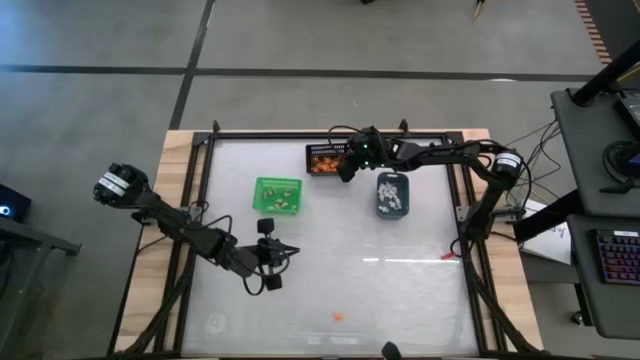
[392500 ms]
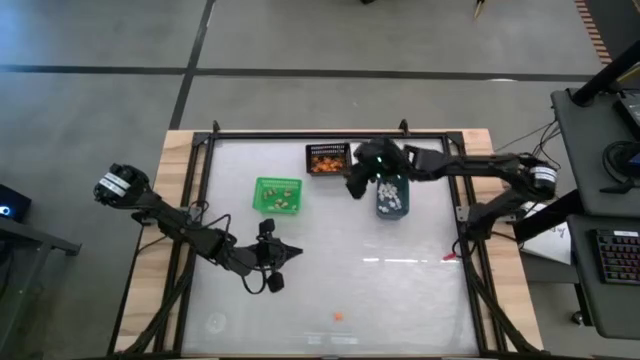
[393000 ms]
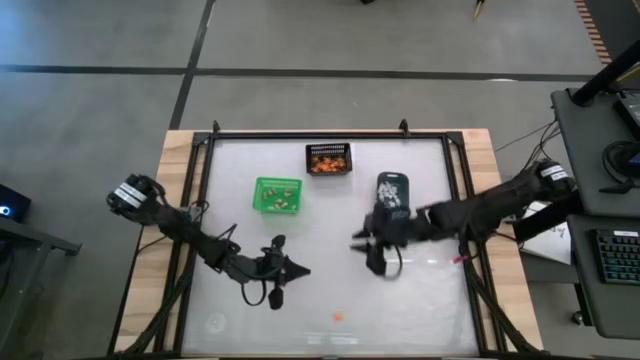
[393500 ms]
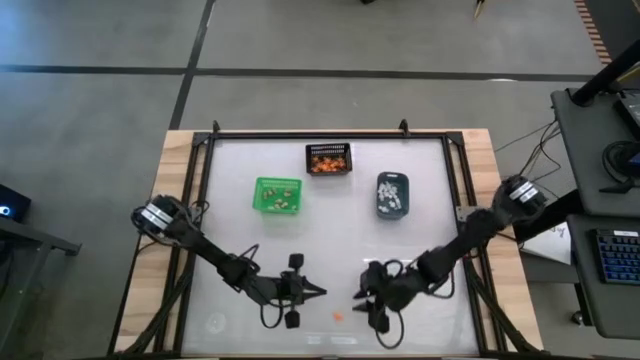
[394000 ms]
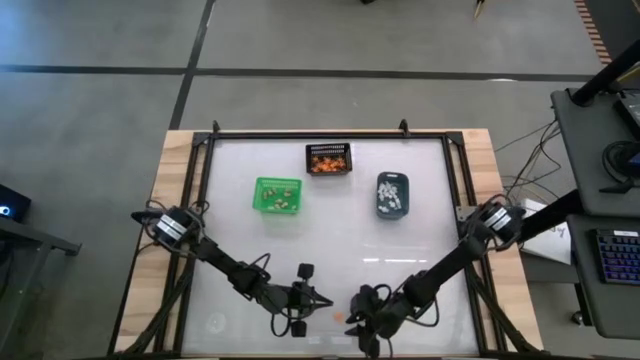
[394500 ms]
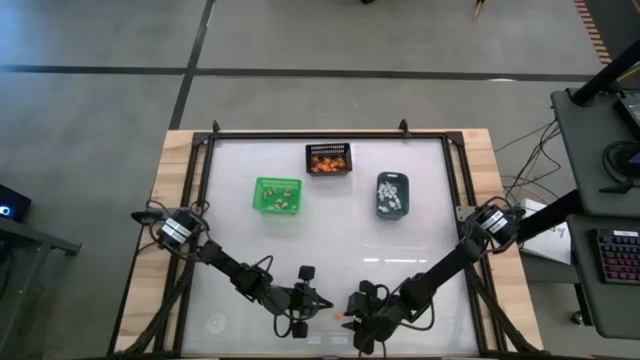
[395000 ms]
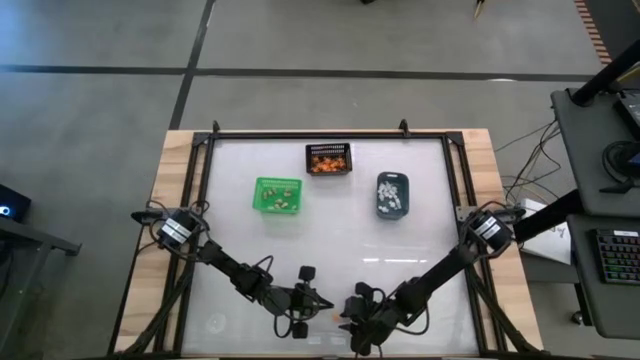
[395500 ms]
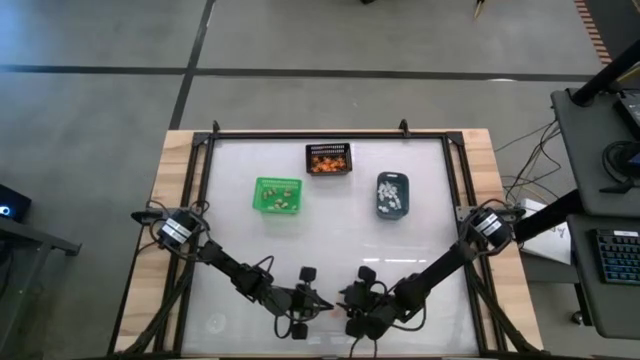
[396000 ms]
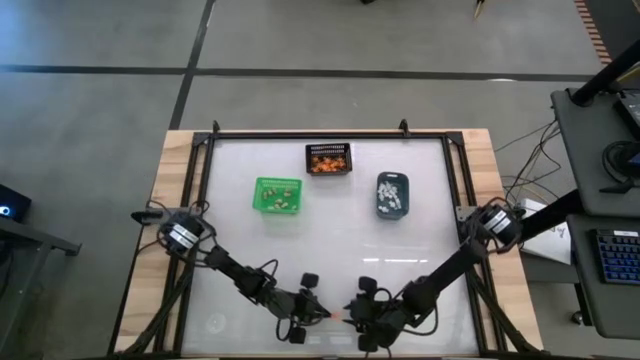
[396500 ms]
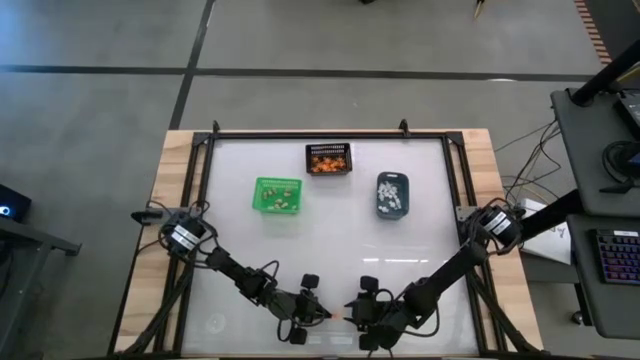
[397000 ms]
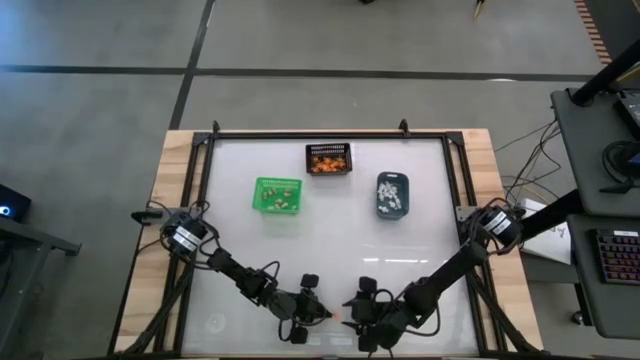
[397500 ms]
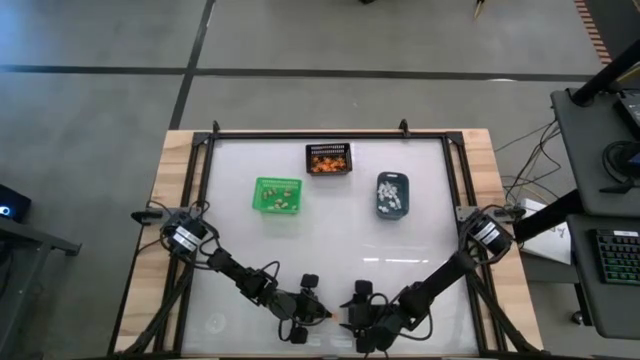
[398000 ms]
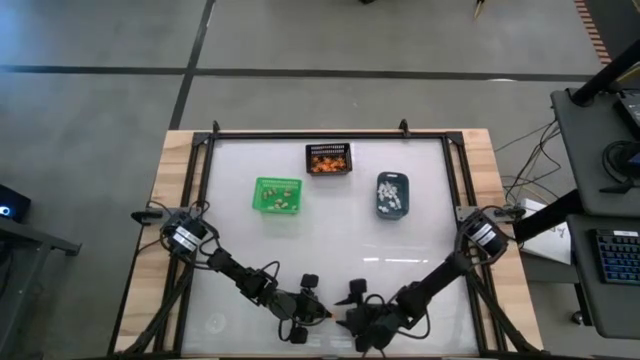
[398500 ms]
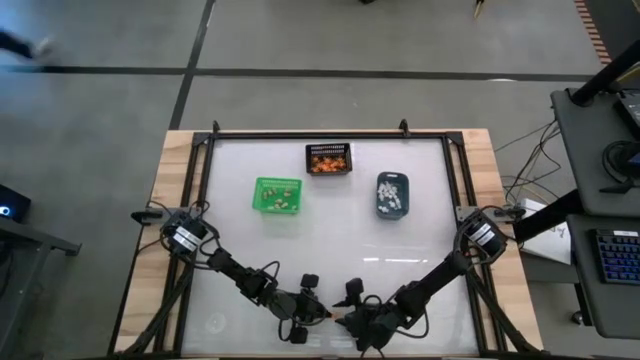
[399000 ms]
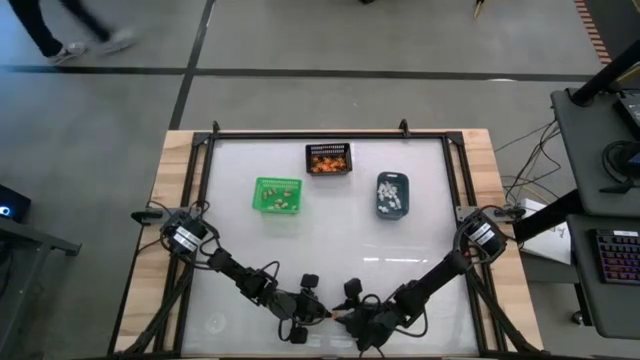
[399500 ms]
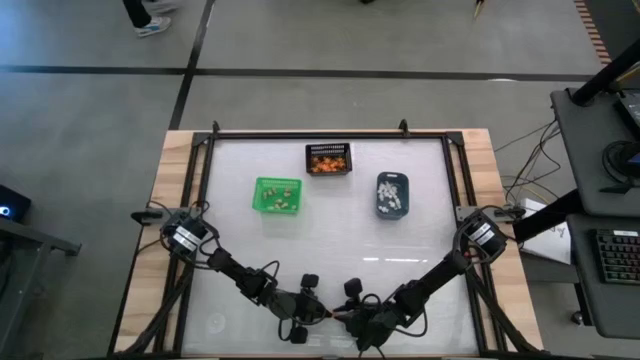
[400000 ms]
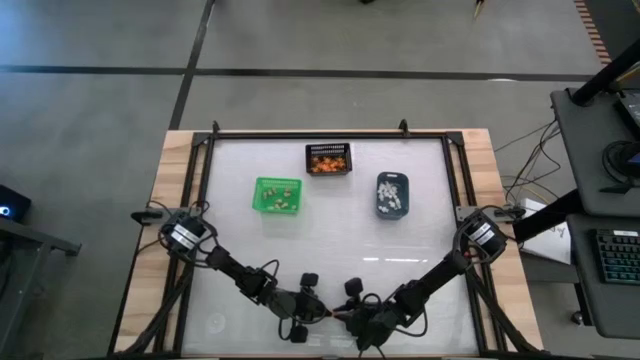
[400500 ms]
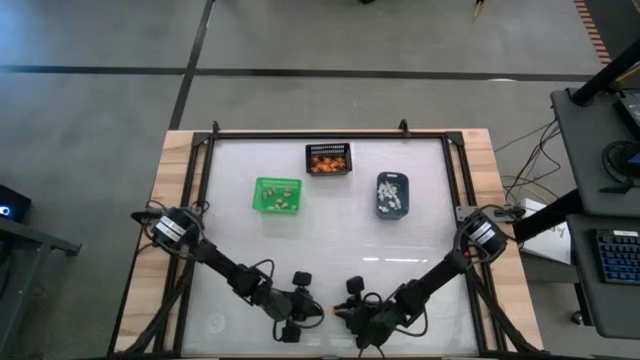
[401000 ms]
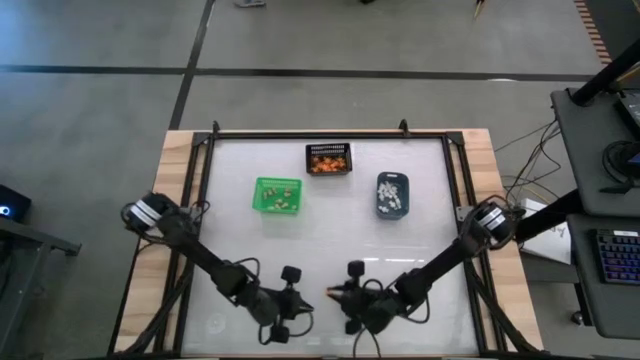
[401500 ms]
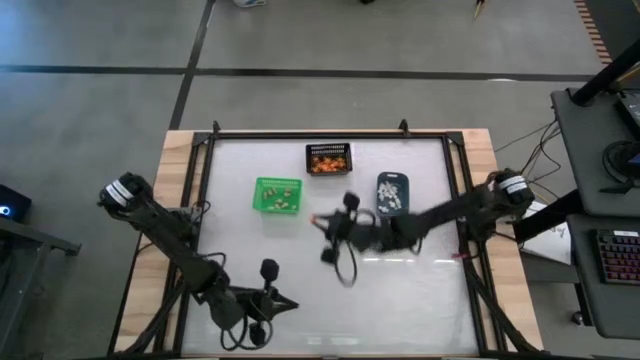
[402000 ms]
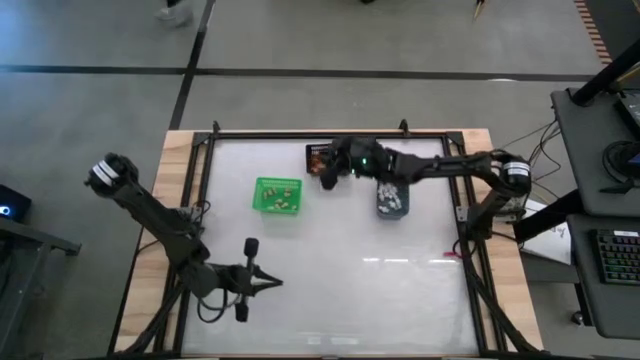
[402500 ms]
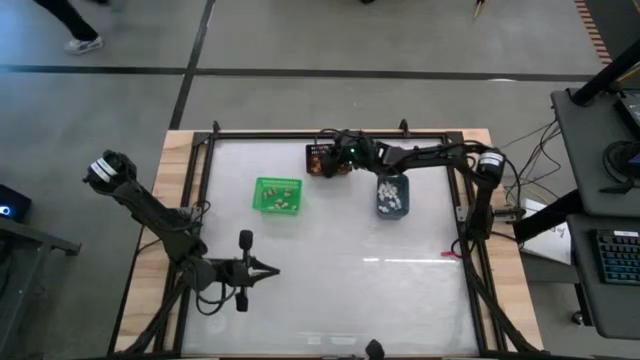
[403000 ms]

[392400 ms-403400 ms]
Task: Sort Halloween decoration
Put the orange spider toy into the black bin

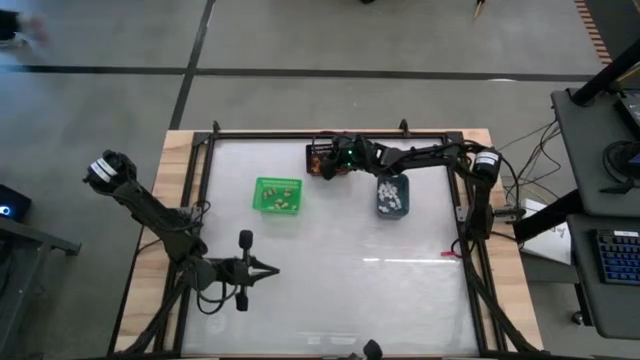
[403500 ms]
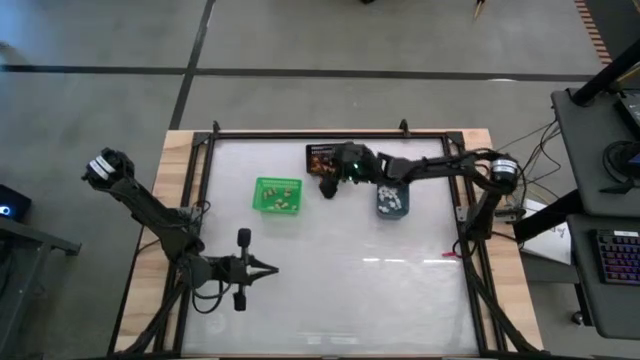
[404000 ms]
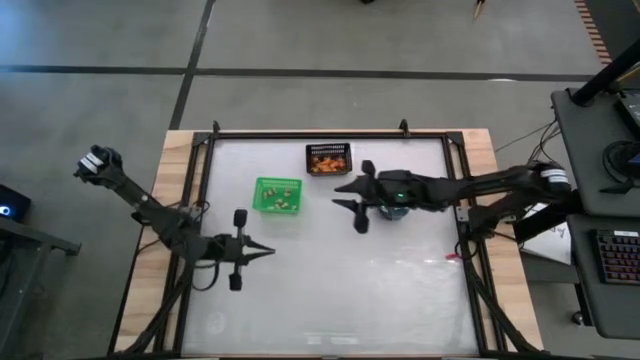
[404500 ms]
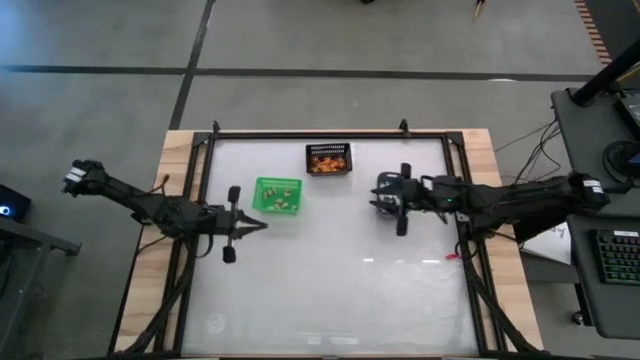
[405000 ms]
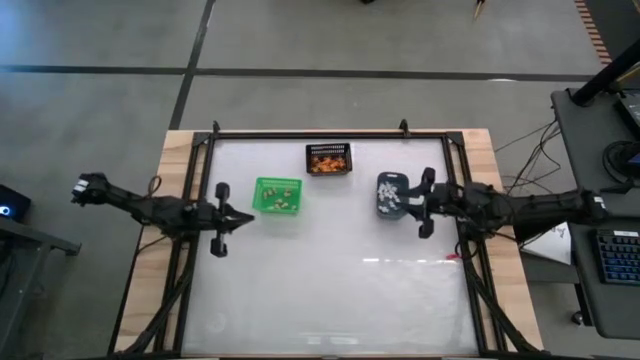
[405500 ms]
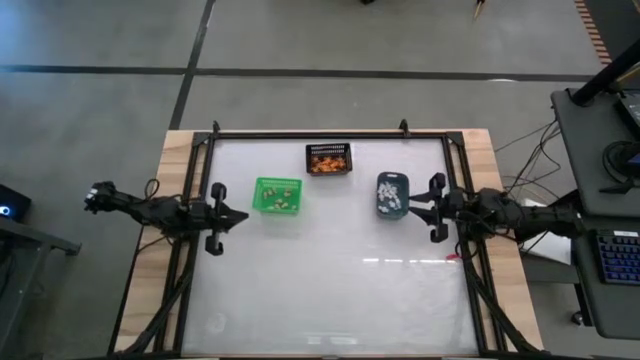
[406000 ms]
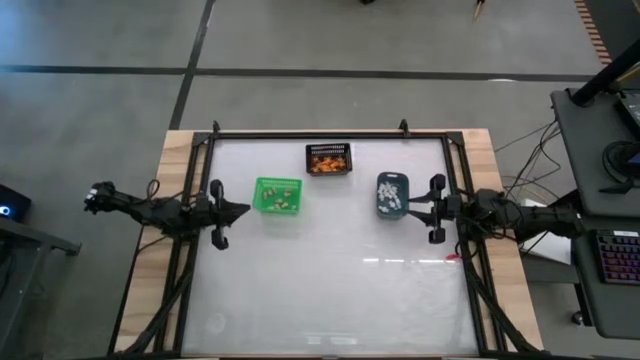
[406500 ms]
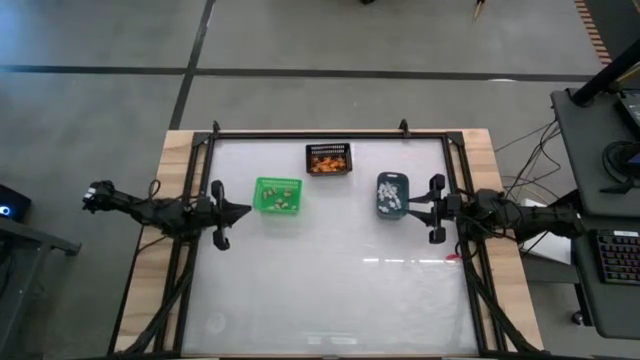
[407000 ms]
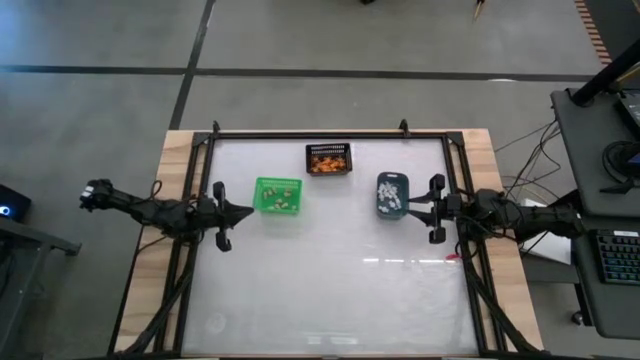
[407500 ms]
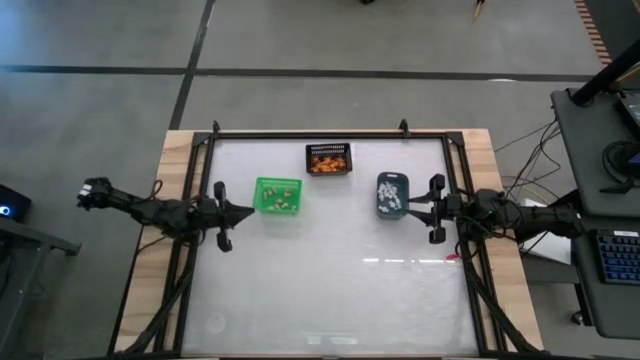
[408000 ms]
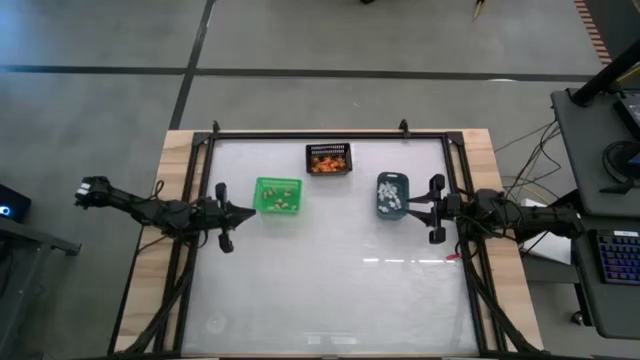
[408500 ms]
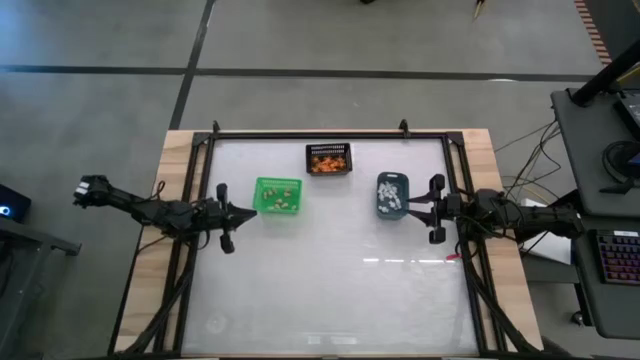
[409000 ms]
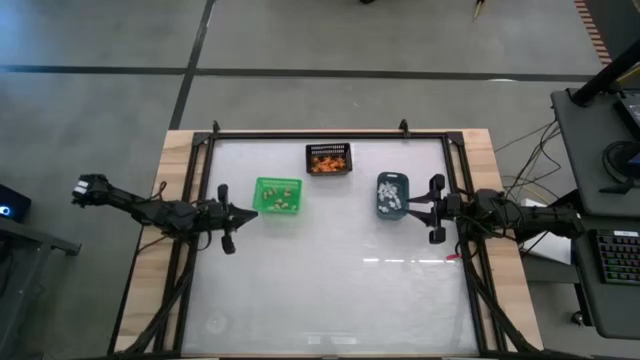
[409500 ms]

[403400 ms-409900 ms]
Return to Home Position

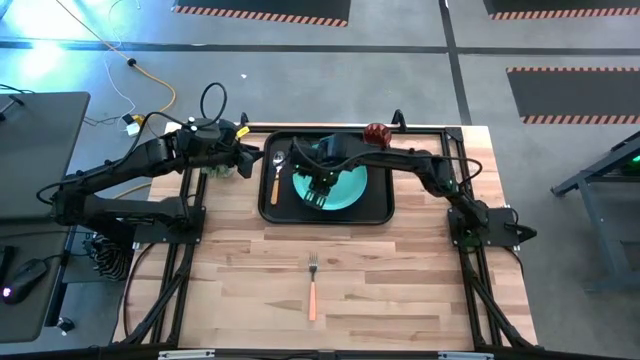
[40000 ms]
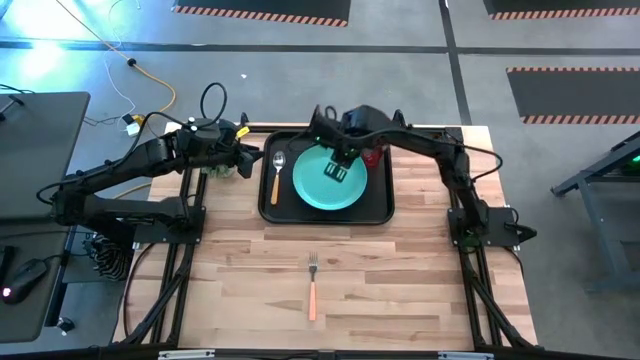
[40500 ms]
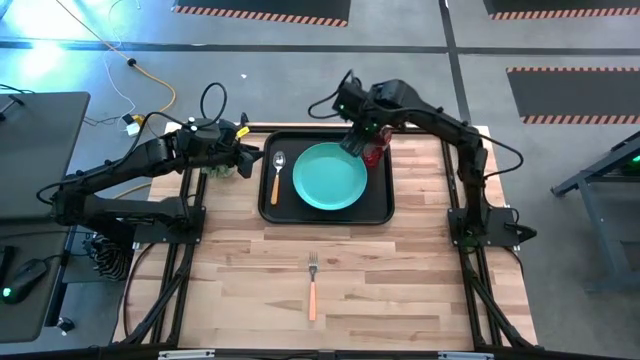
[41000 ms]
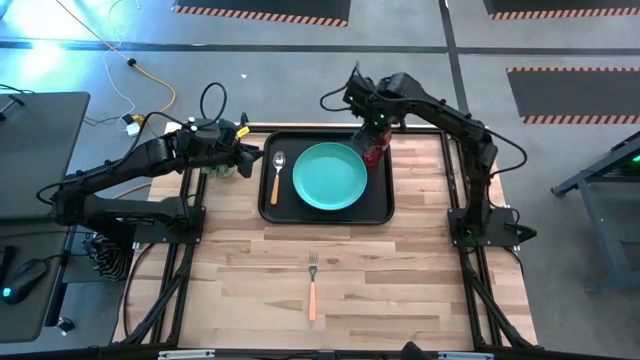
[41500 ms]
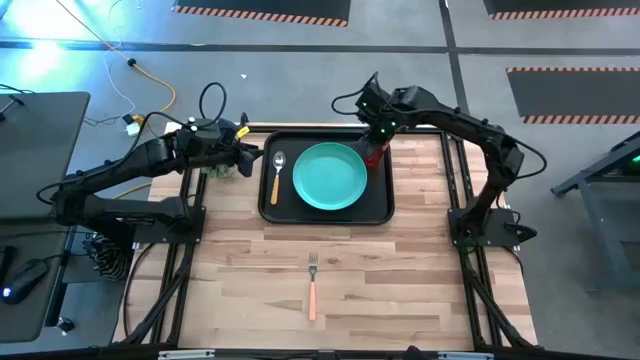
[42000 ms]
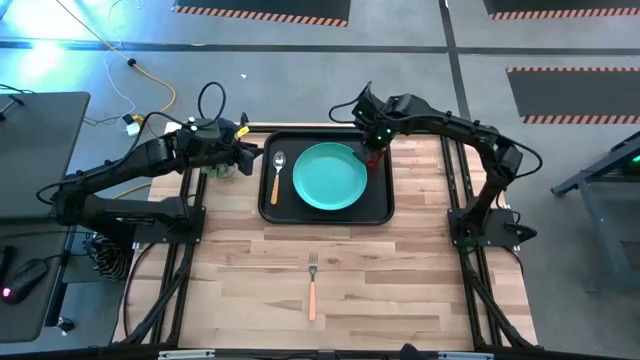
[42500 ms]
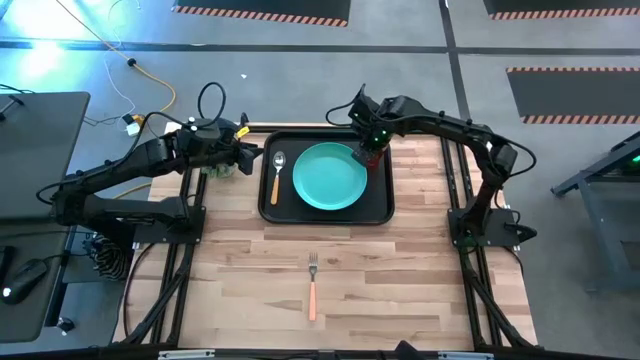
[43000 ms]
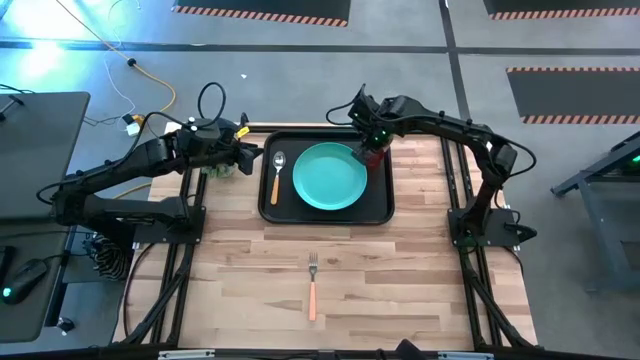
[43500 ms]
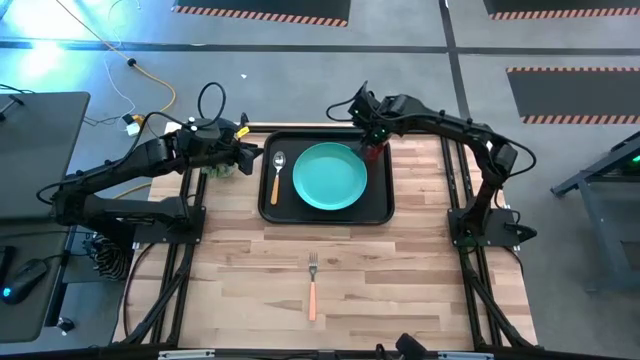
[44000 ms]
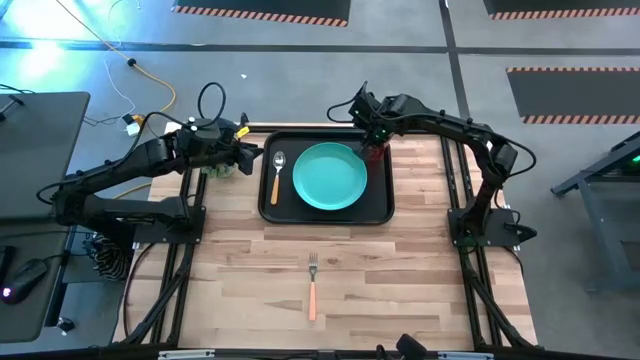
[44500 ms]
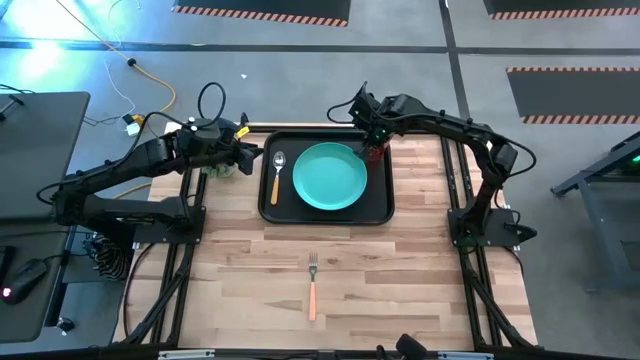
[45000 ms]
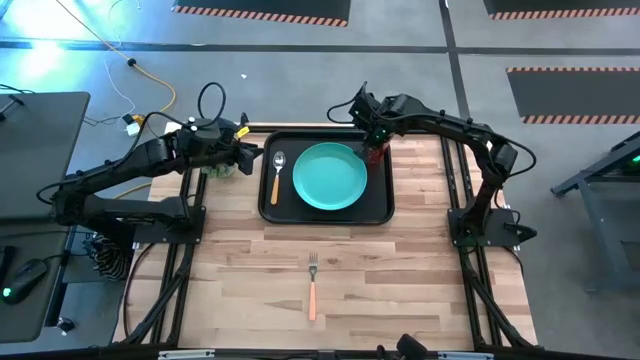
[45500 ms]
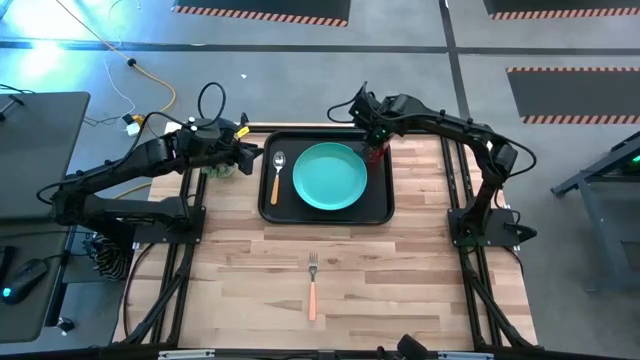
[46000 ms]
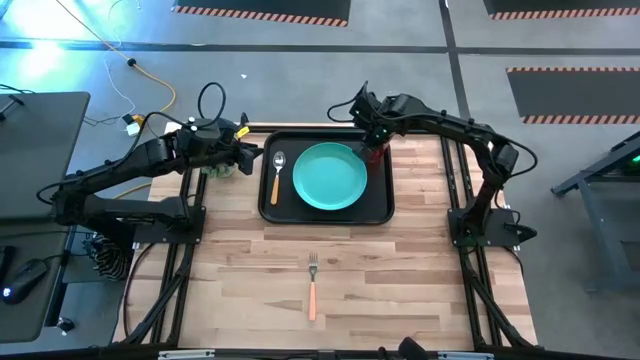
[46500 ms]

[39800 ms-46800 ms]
Task: Pick and place plate/cup/fork/spoon on tray
Adjust the orange glass
